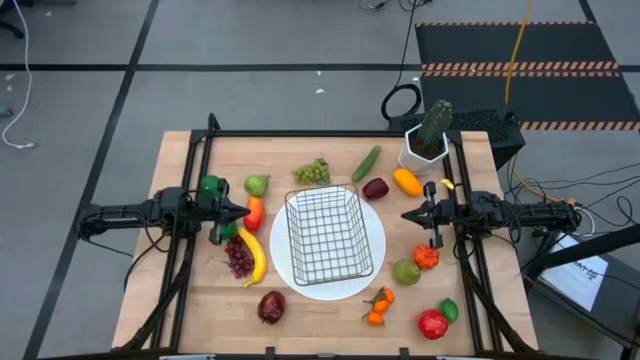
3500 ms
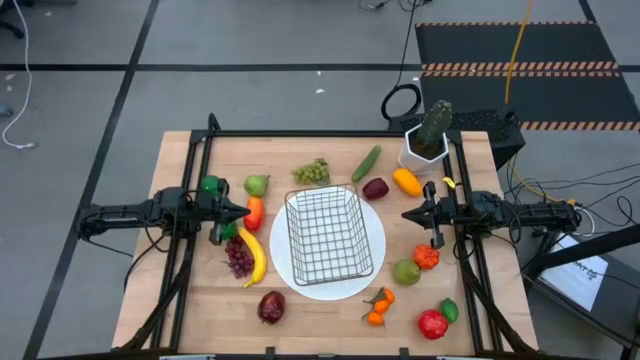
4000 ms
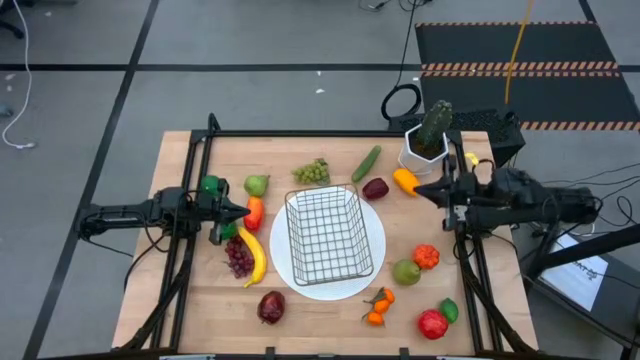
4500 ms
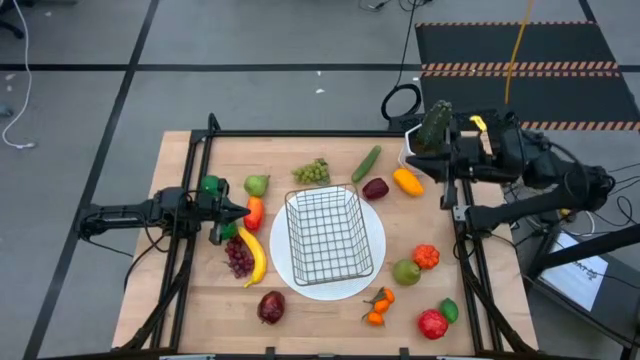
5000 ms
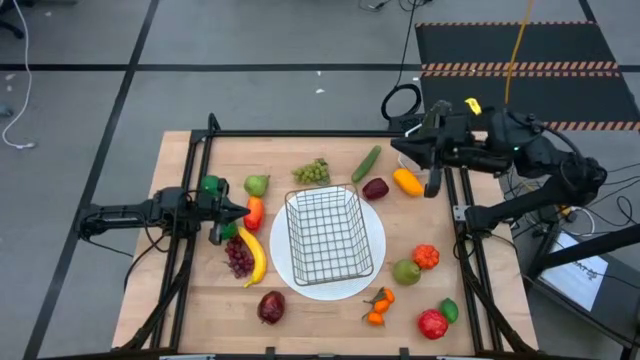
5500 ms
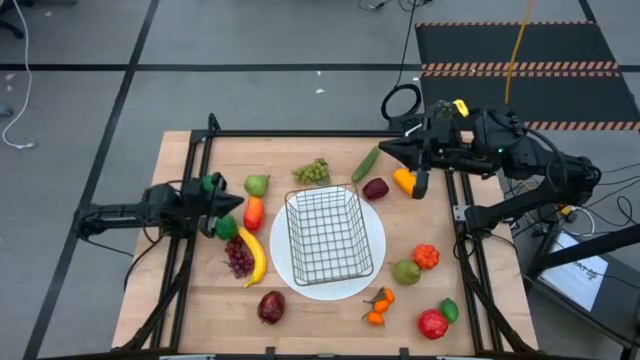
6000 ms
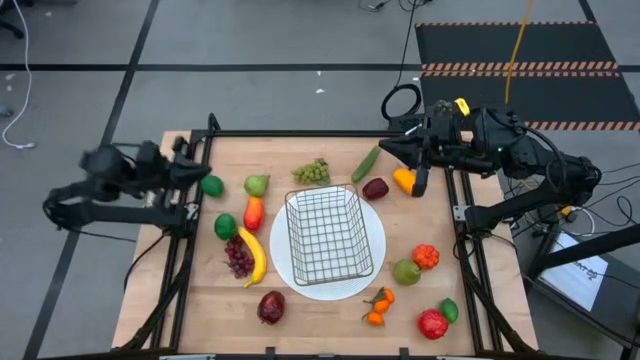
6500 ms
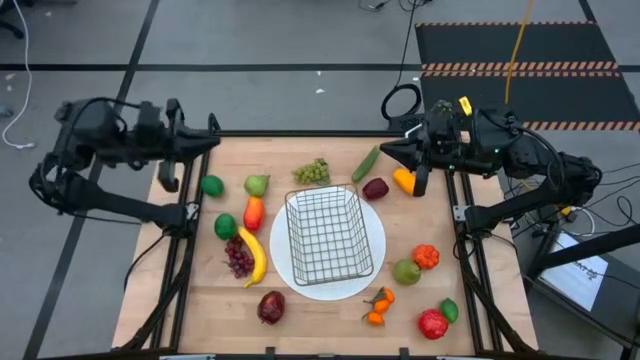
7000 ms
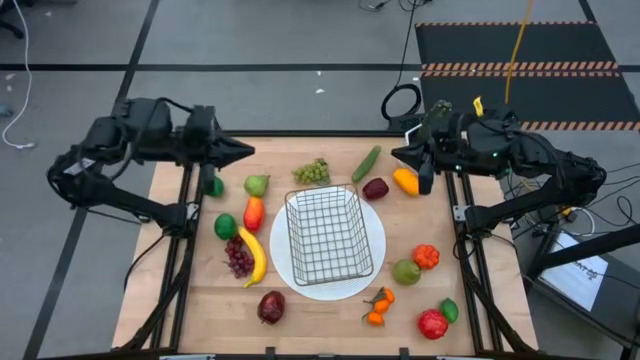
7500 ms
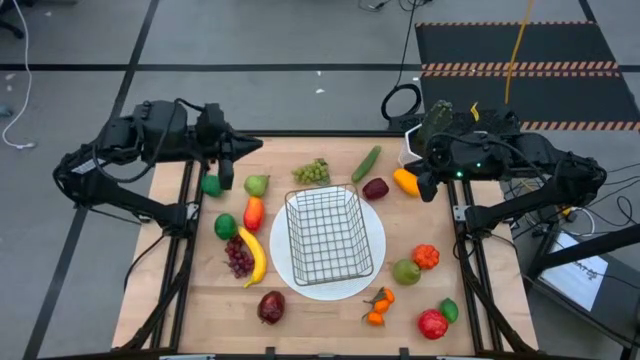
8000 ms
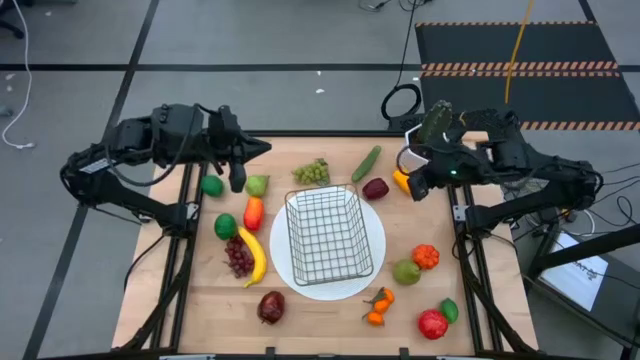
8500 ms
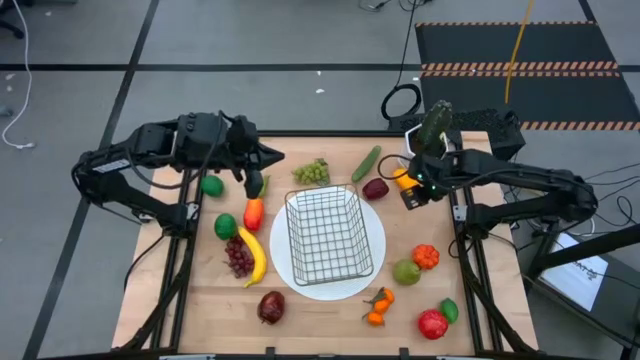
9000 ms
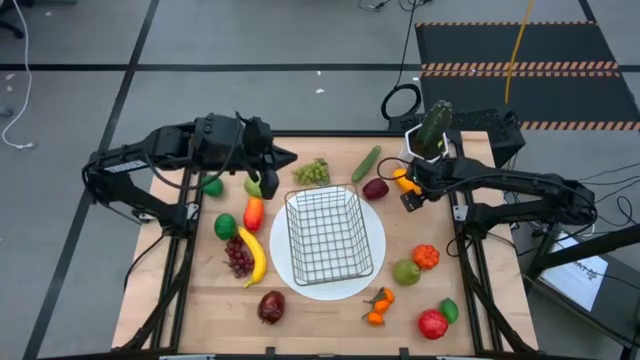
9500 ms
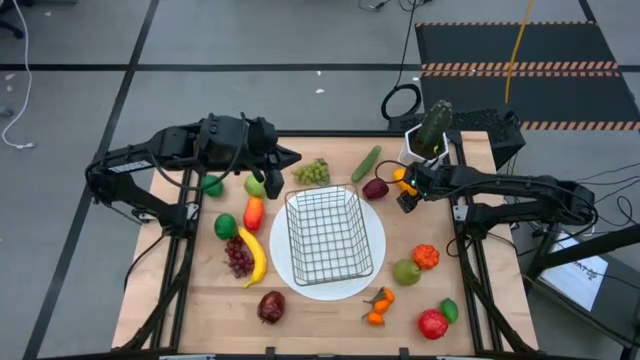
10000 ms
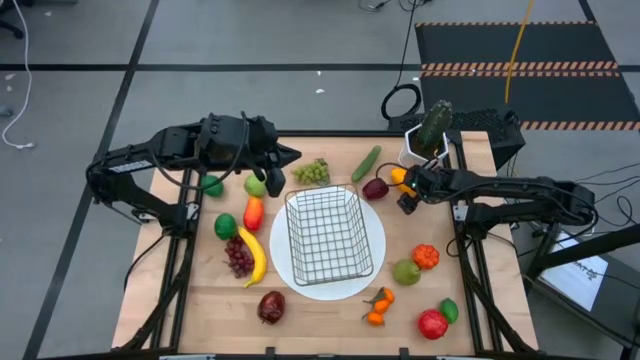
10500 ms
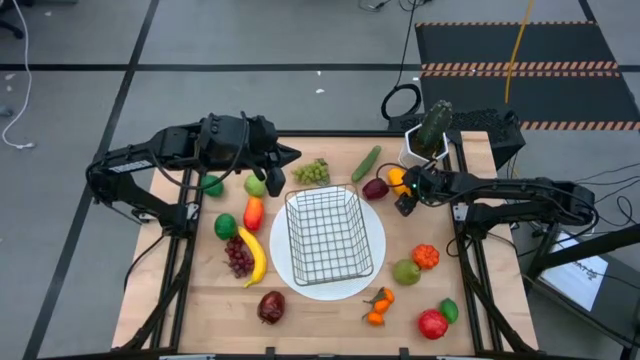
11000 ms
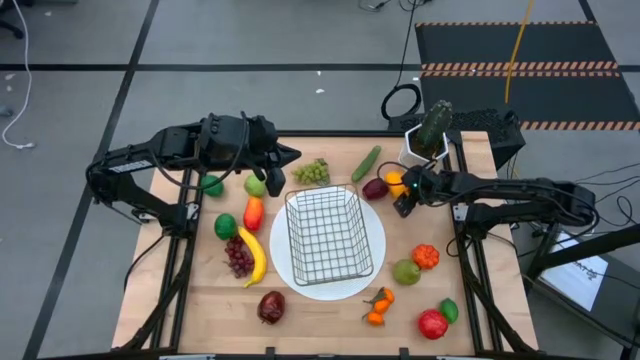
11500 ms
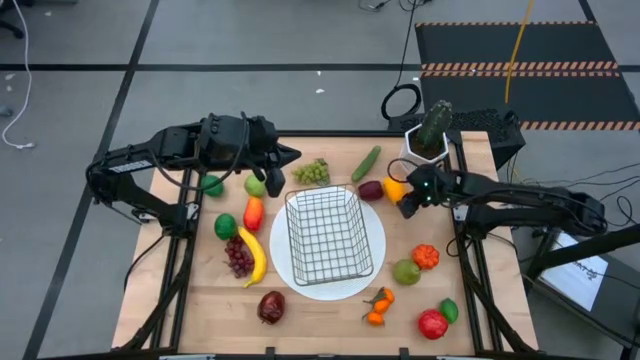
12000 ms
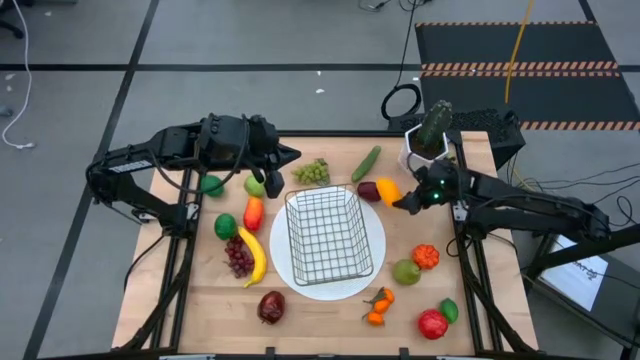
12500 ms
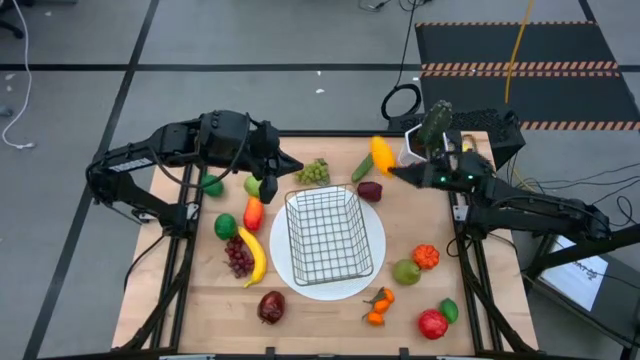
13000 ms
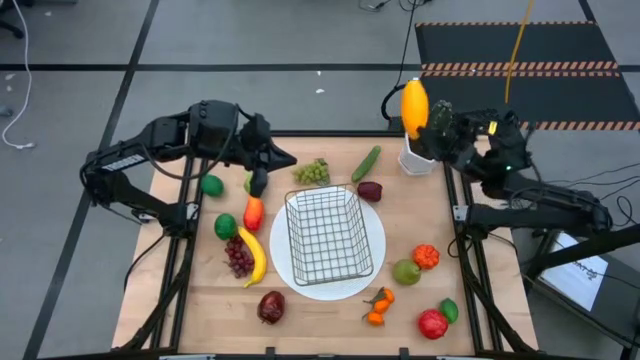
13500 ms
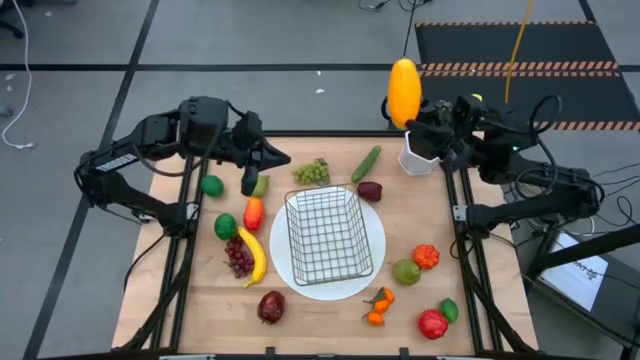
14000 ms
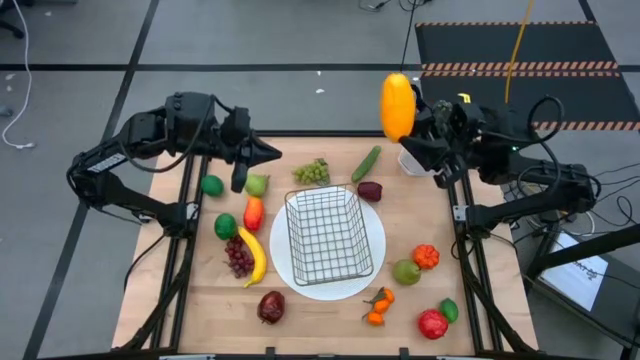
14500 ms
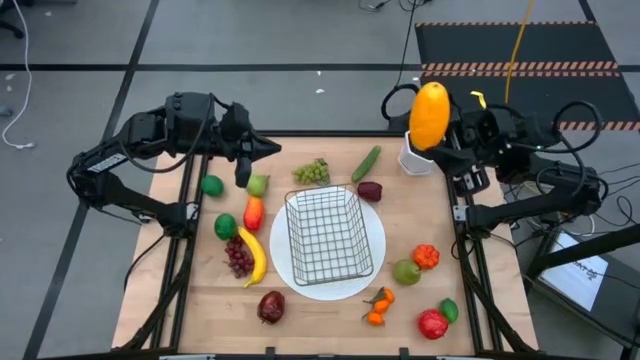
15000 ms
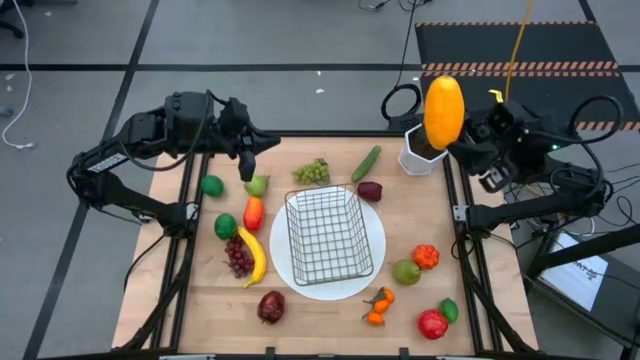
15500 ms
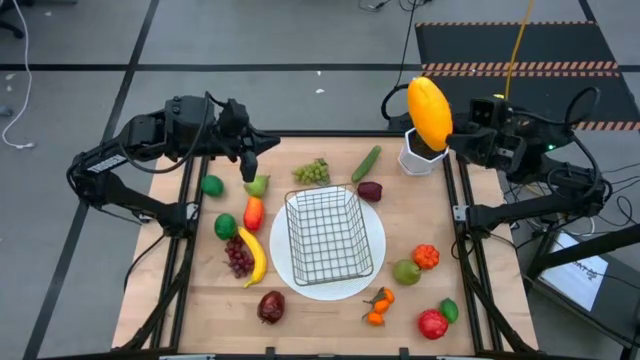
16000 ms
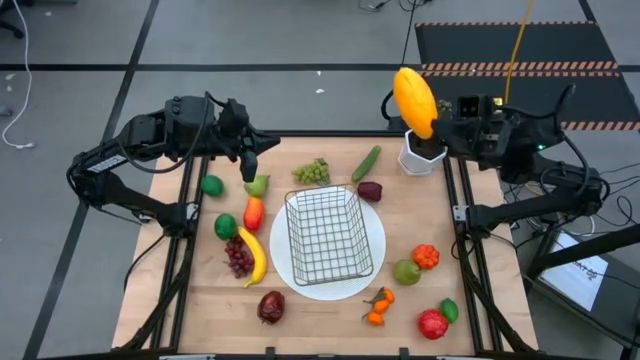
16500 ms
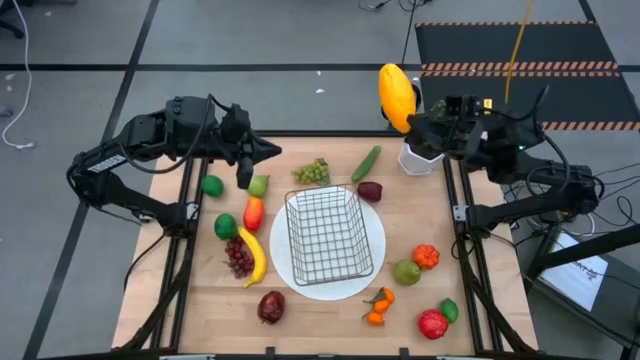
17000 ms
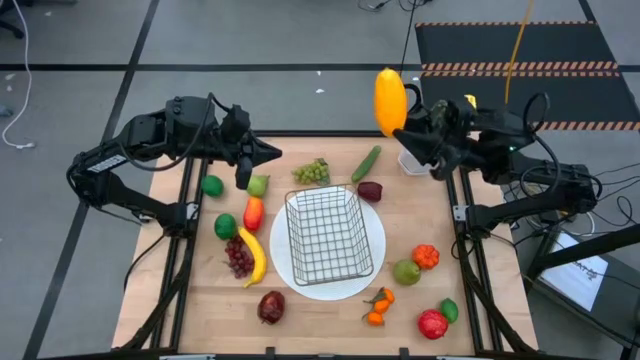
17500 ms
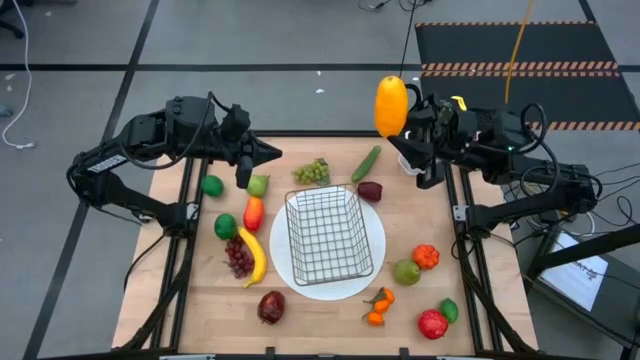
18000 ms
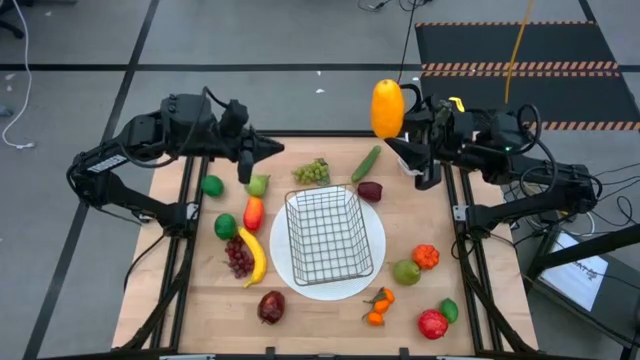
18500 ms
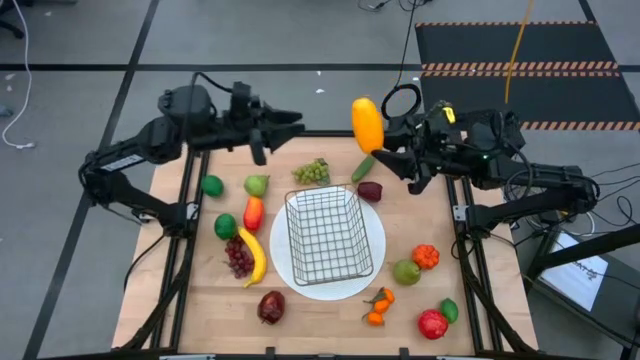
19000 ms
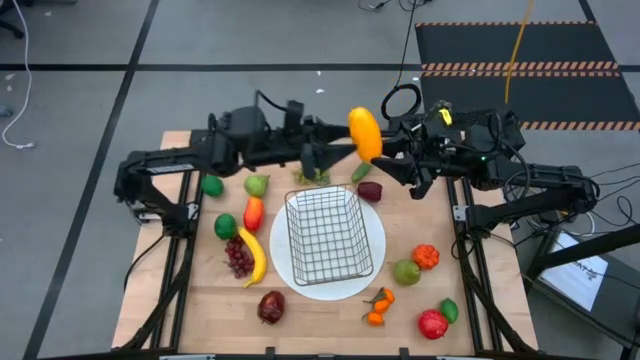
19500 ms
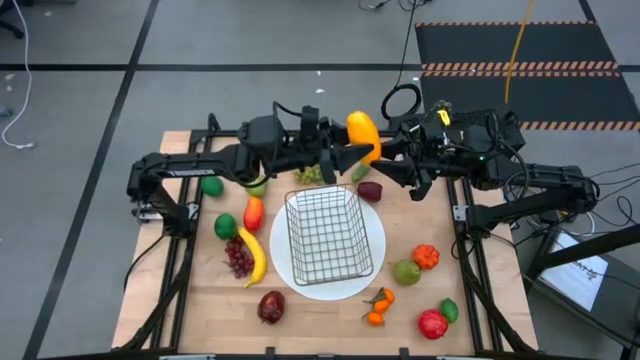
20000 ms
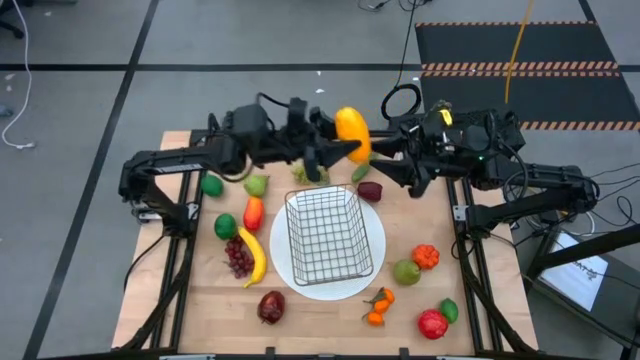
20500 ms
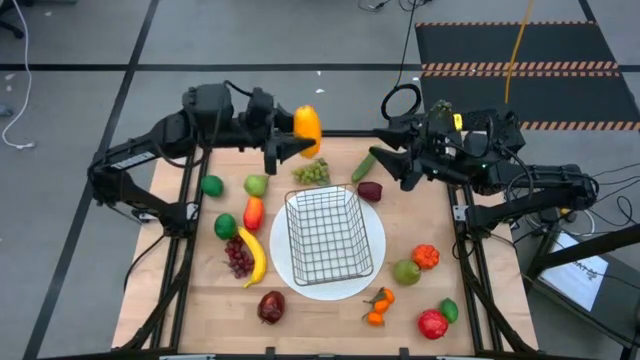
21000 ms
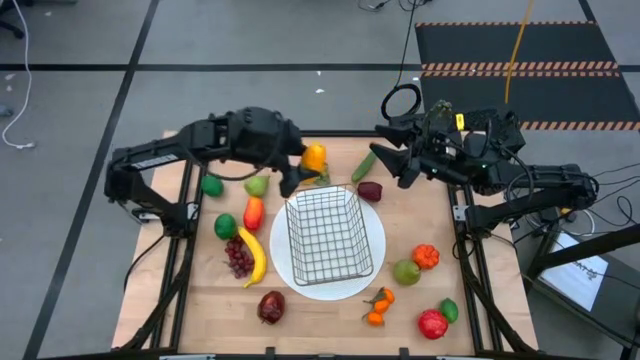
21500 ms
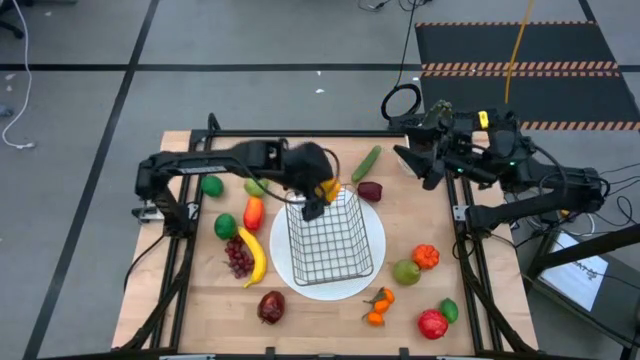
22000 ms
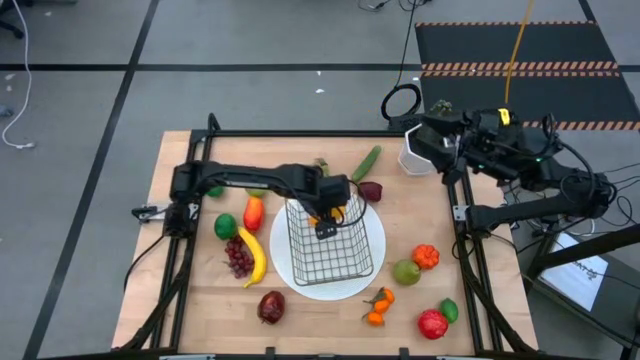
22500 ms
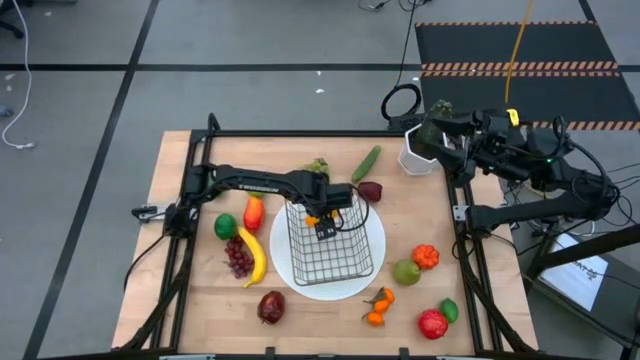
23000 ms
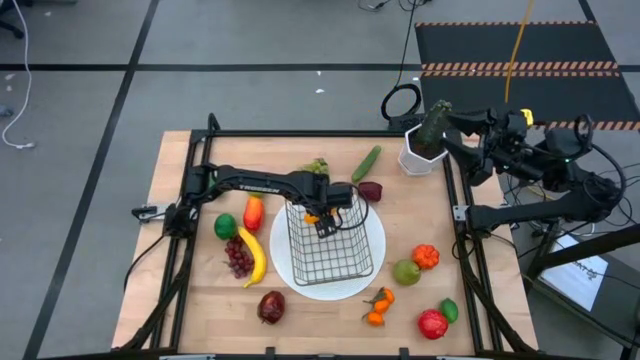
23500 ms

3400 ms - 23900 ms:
Task: Build produce basket
Put the yellow mango into the black wire basket
